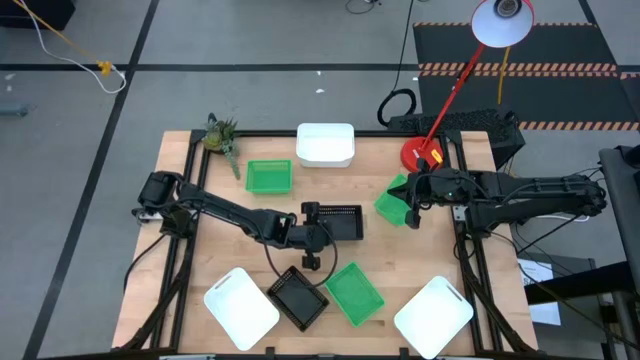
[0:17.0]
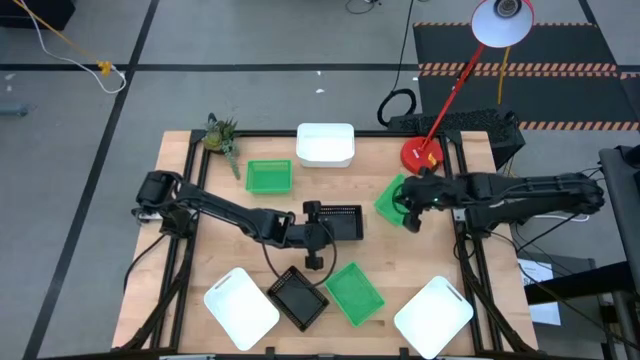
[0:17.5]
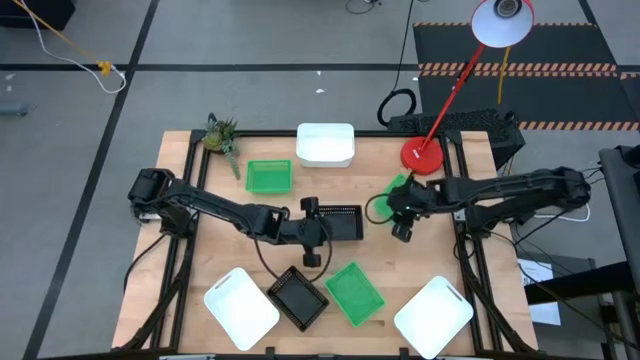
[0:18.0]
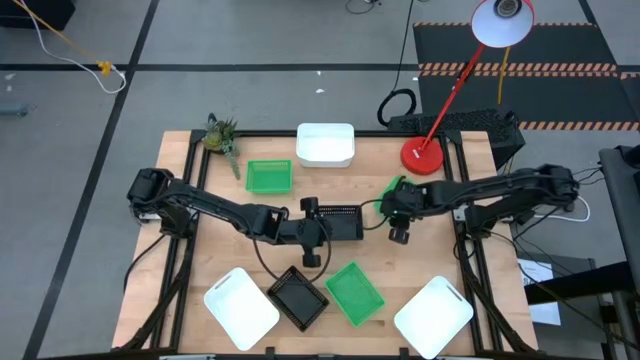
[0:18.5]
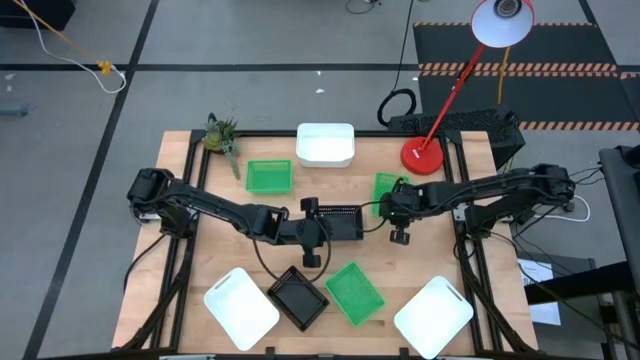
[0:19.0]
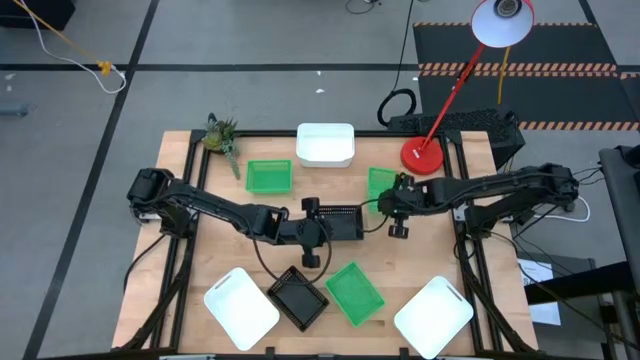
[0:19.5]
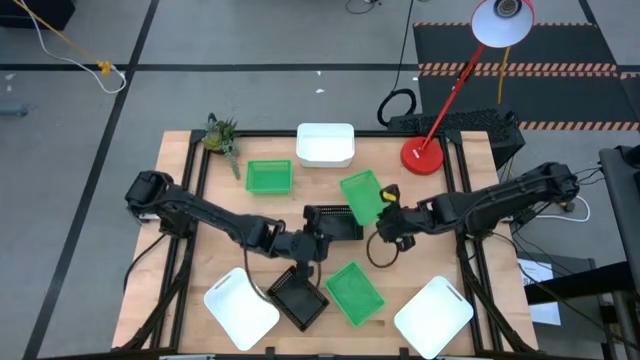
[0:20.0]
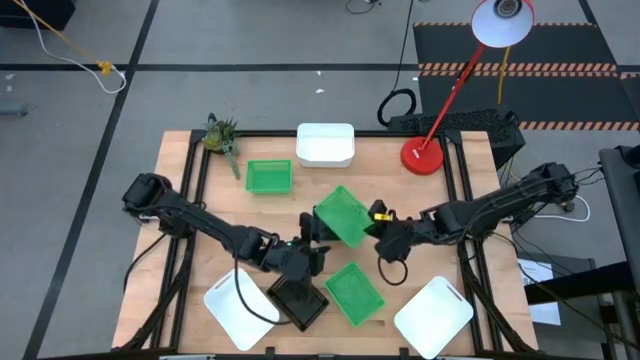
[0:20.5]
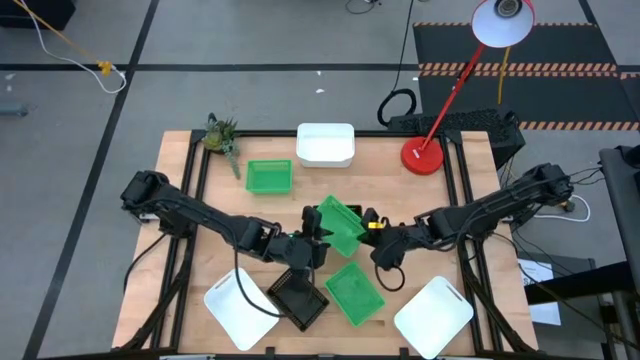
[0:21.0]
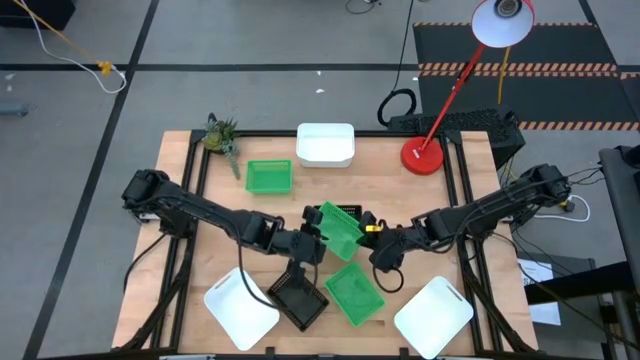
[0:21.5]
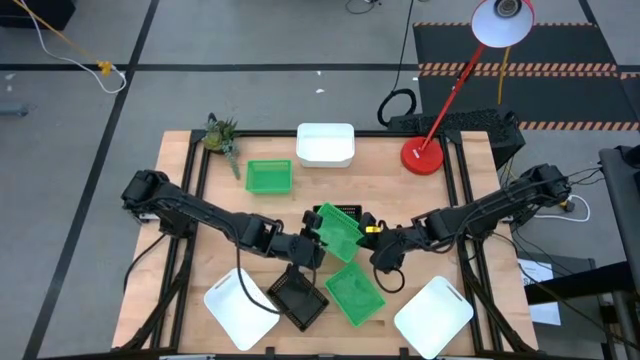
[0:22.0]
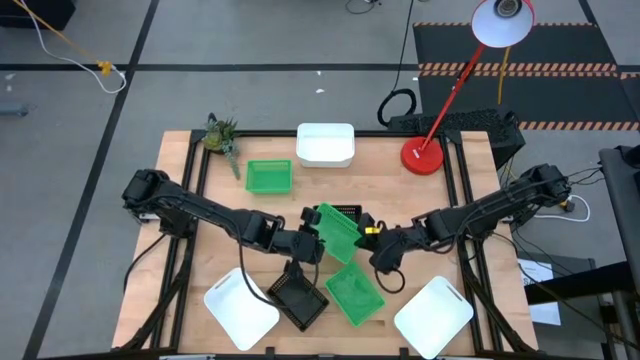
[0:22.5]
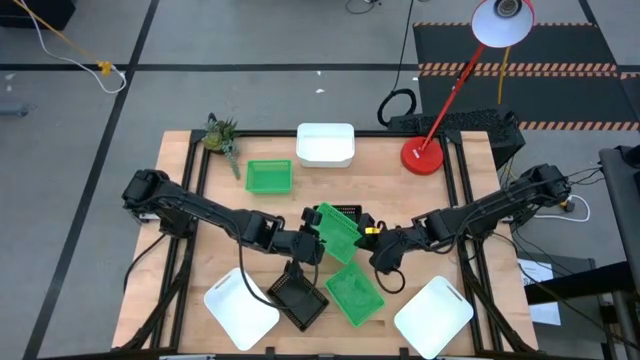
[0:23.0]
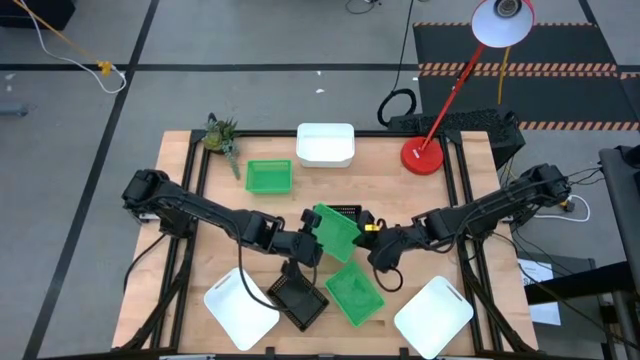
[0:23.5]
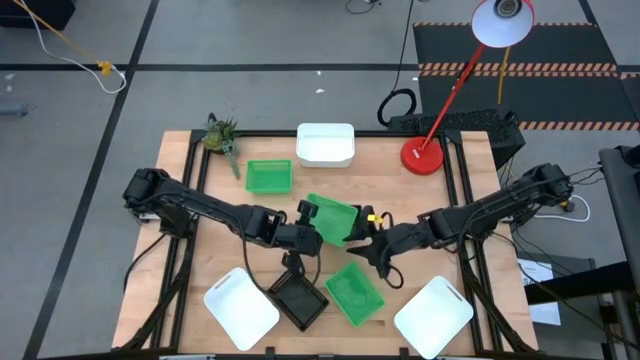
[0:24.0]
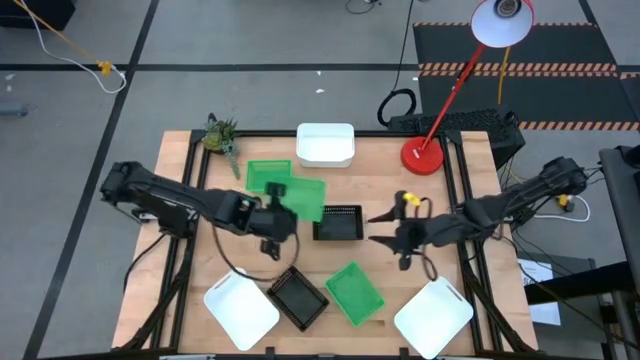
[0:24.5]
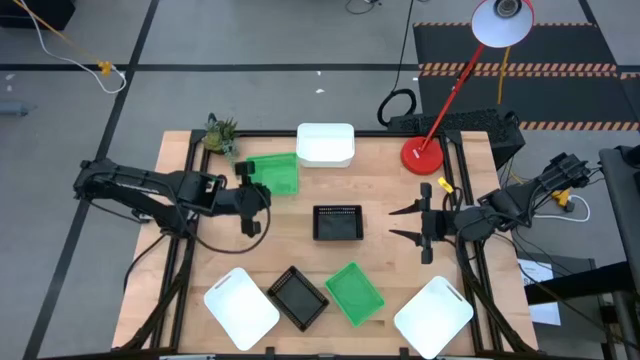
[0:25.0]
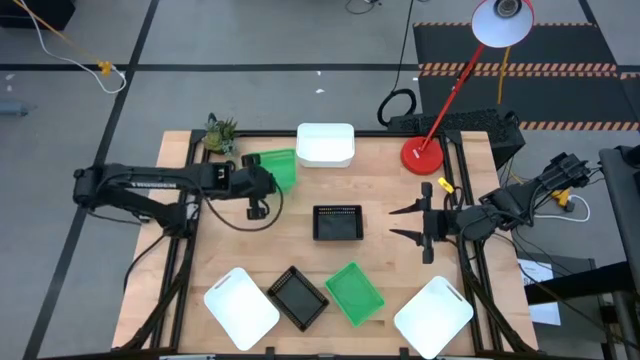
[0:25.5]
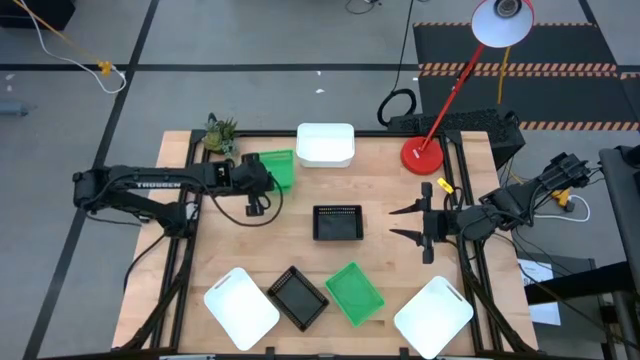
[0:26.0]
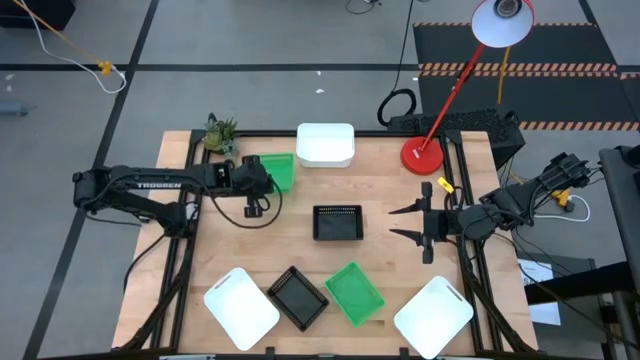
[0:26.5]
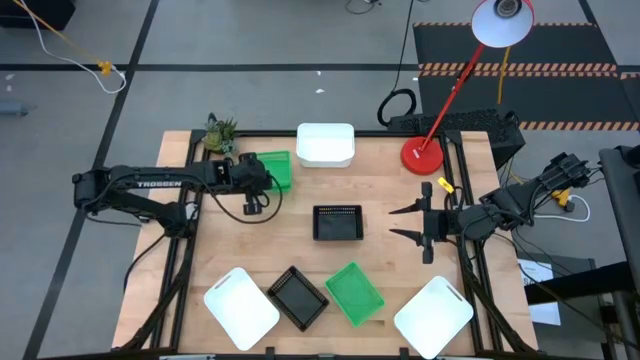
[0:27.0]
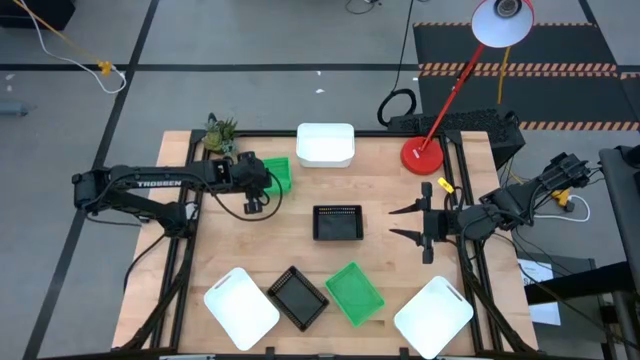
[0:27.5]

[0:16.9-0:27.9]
Stack the top right green bin on the top left green bin
